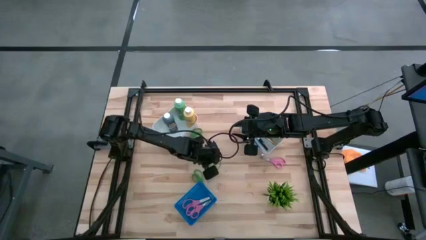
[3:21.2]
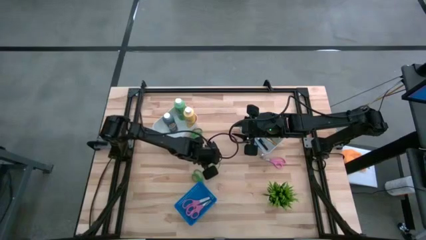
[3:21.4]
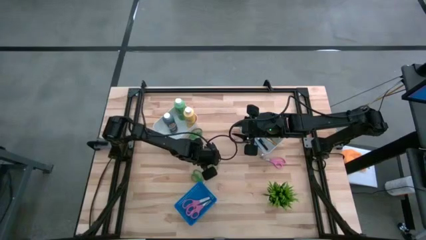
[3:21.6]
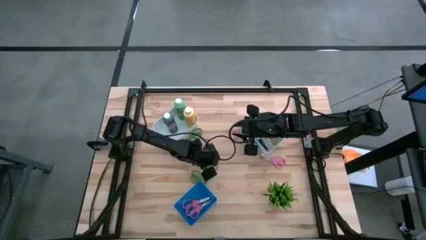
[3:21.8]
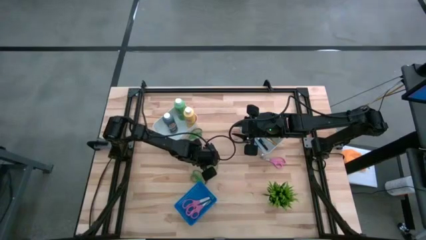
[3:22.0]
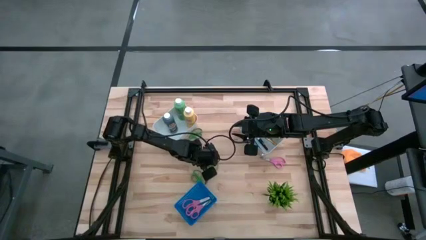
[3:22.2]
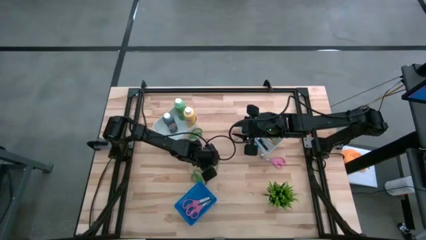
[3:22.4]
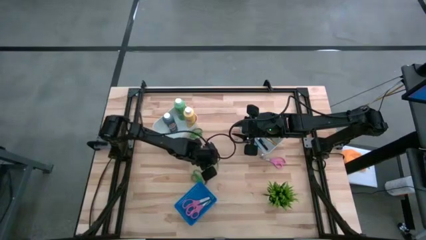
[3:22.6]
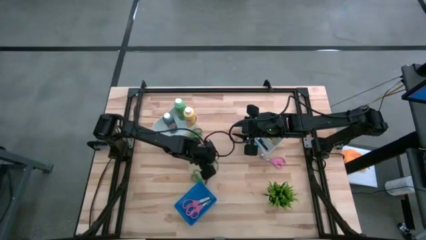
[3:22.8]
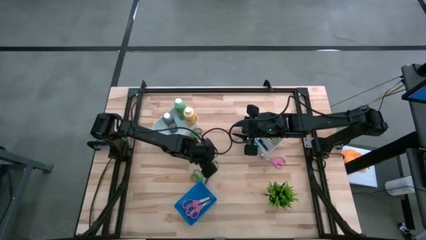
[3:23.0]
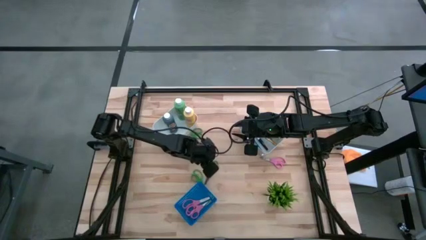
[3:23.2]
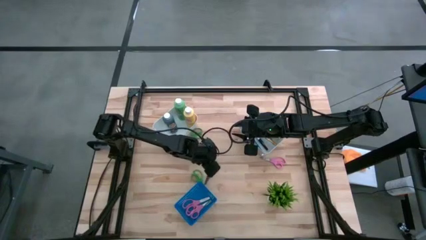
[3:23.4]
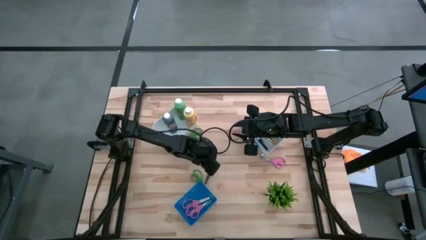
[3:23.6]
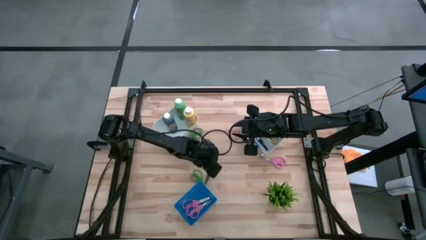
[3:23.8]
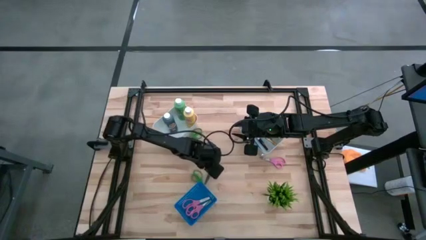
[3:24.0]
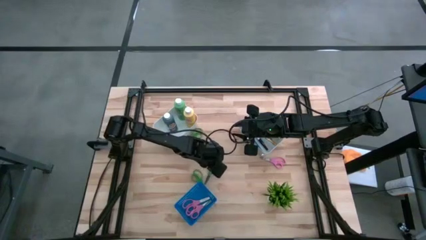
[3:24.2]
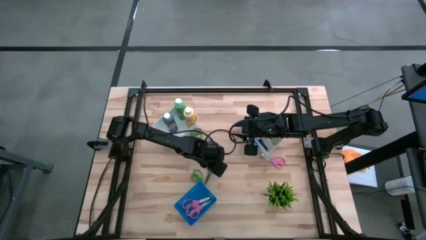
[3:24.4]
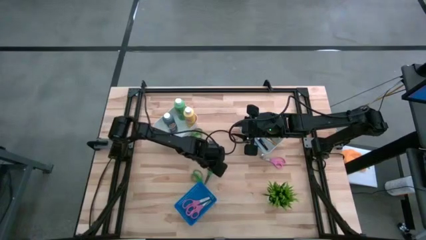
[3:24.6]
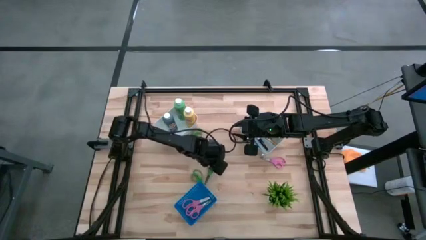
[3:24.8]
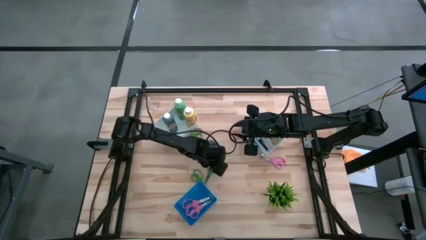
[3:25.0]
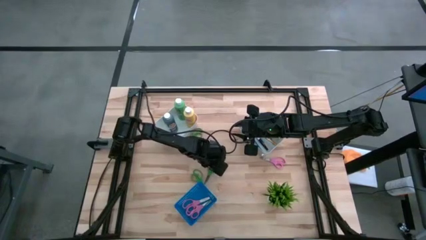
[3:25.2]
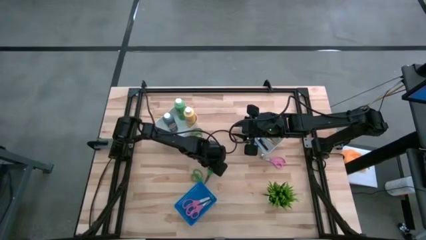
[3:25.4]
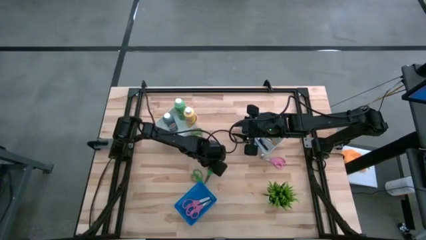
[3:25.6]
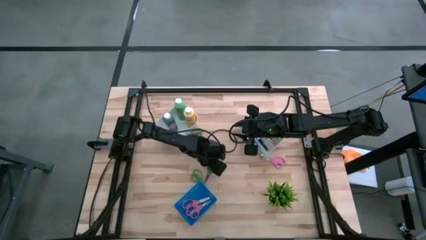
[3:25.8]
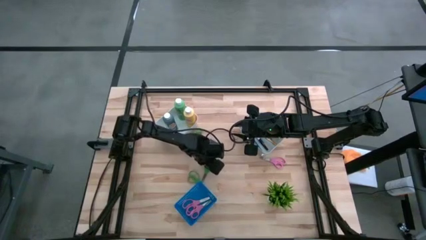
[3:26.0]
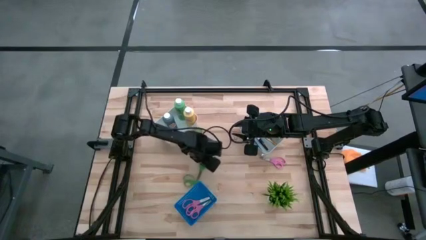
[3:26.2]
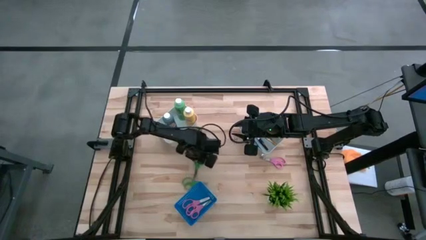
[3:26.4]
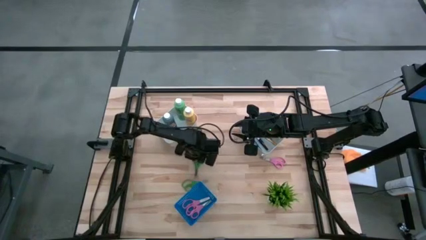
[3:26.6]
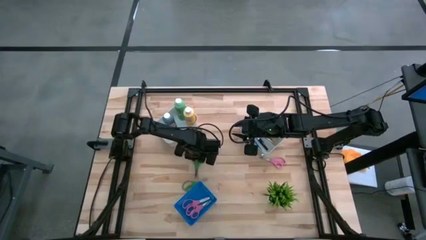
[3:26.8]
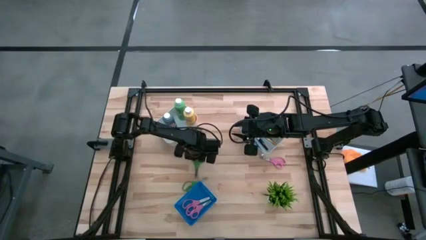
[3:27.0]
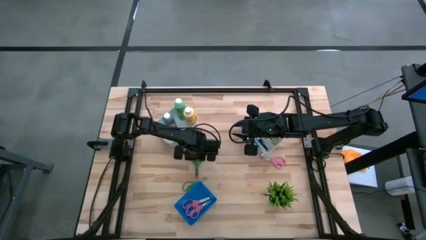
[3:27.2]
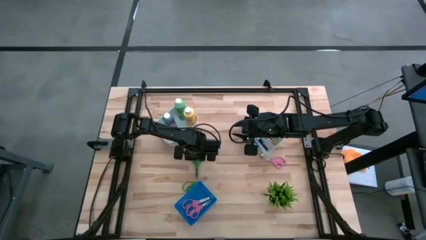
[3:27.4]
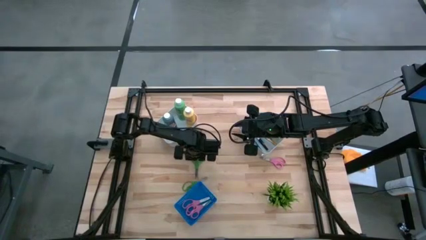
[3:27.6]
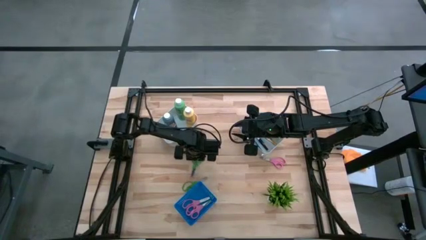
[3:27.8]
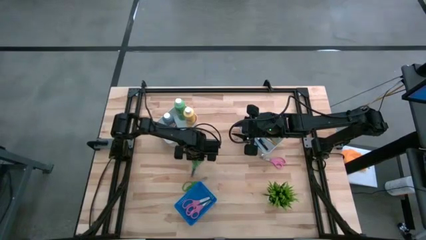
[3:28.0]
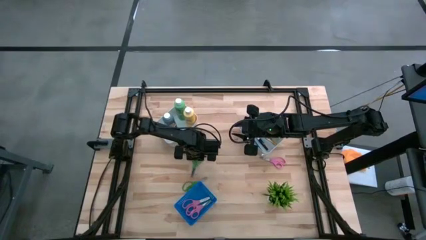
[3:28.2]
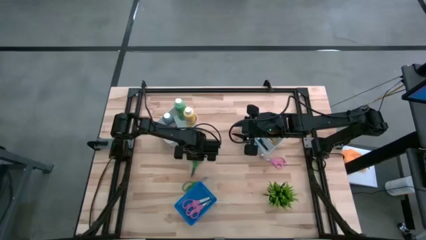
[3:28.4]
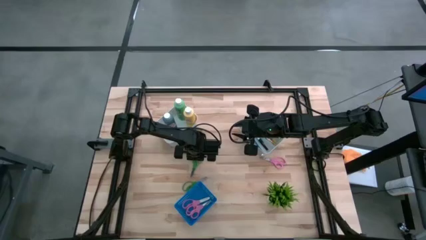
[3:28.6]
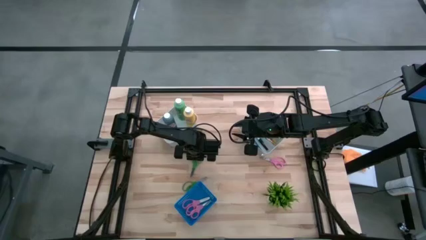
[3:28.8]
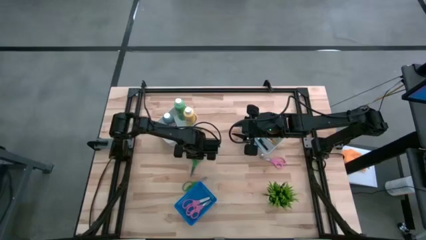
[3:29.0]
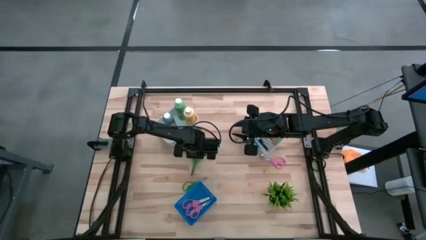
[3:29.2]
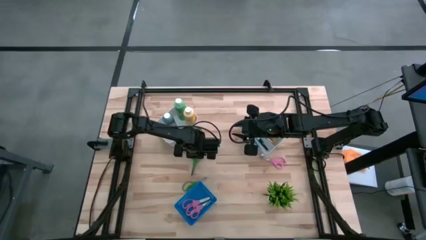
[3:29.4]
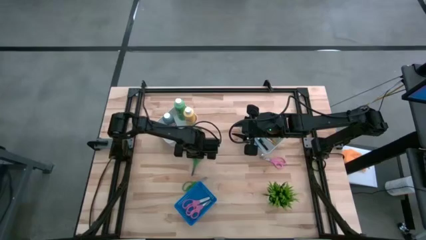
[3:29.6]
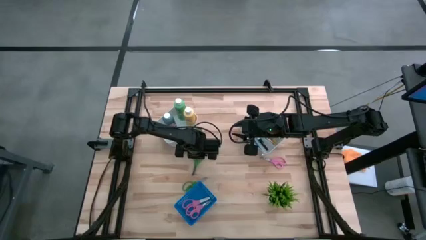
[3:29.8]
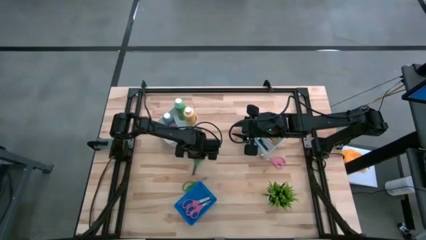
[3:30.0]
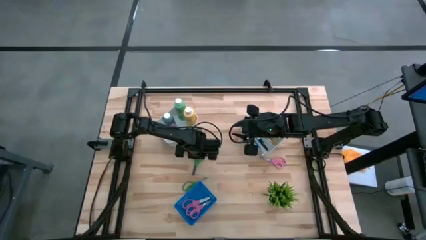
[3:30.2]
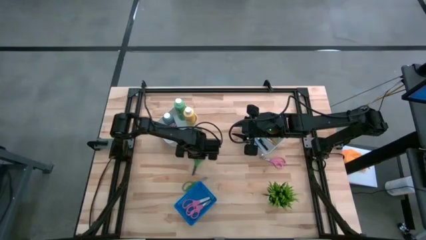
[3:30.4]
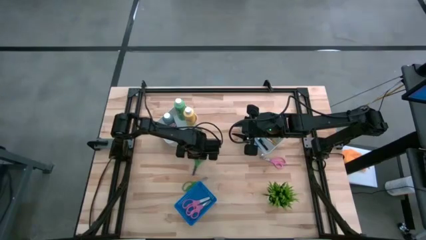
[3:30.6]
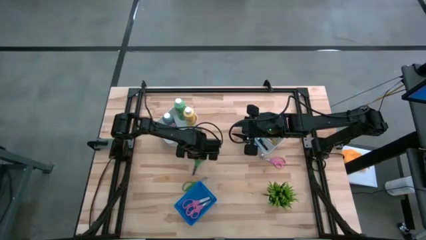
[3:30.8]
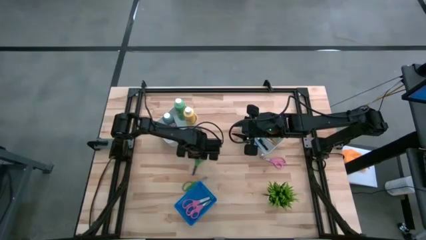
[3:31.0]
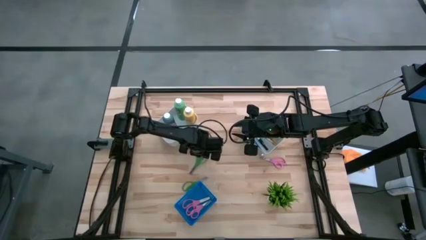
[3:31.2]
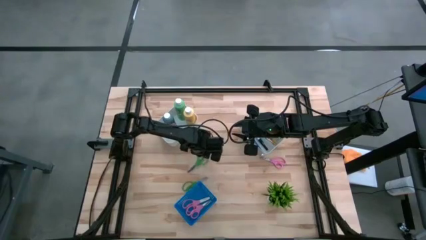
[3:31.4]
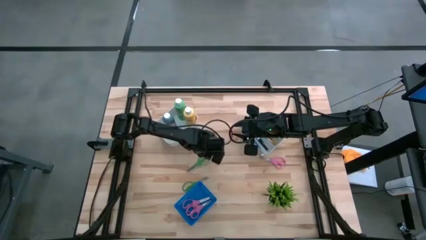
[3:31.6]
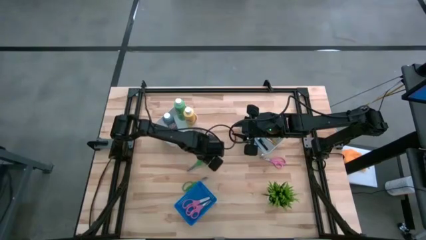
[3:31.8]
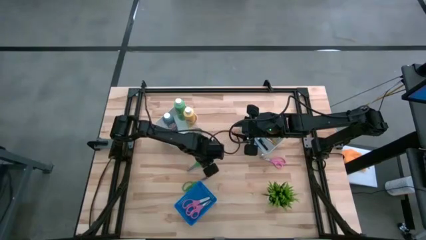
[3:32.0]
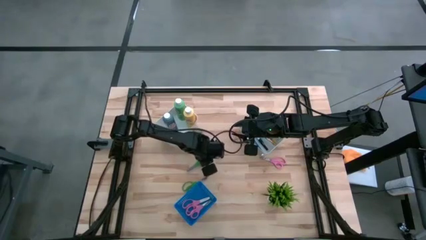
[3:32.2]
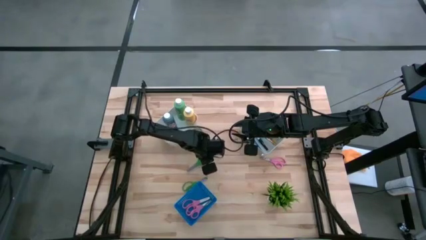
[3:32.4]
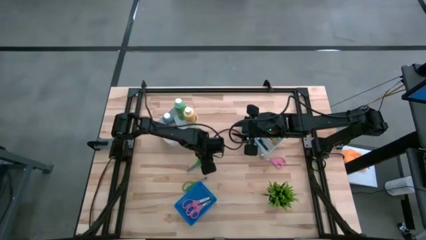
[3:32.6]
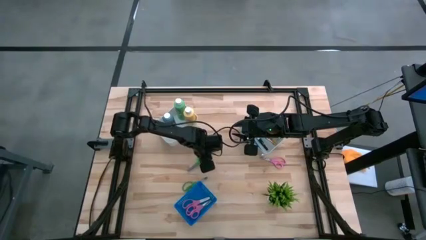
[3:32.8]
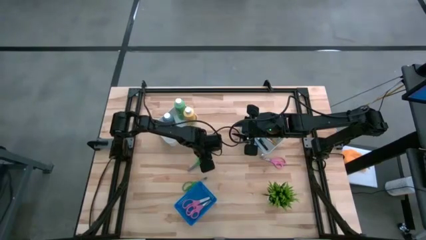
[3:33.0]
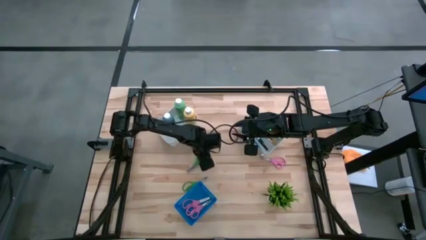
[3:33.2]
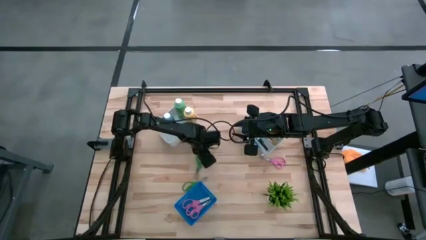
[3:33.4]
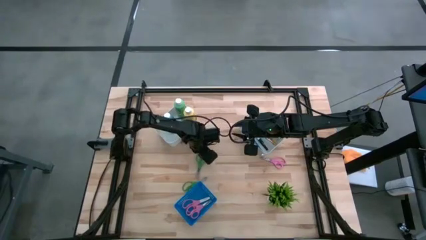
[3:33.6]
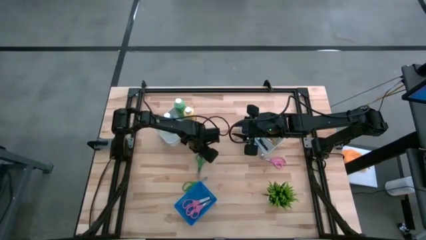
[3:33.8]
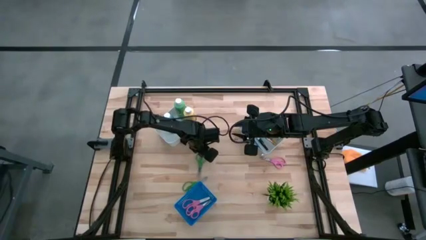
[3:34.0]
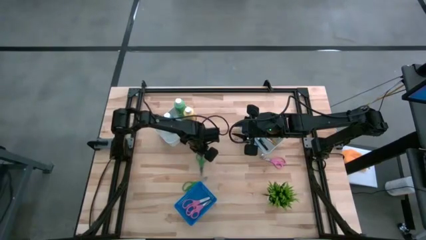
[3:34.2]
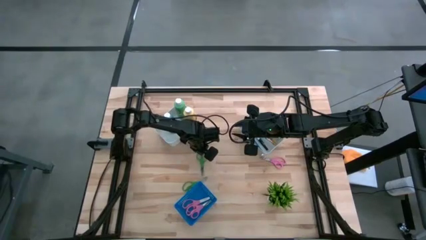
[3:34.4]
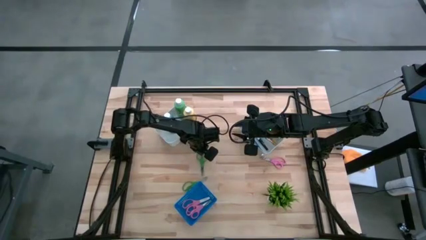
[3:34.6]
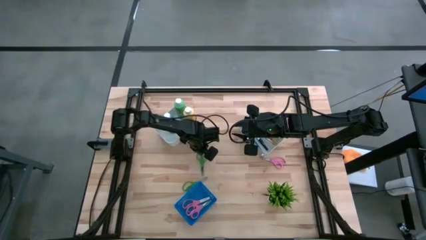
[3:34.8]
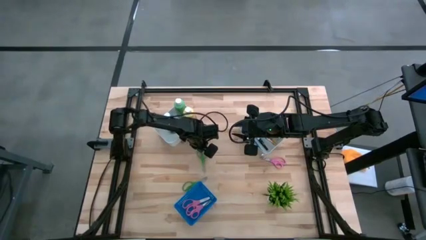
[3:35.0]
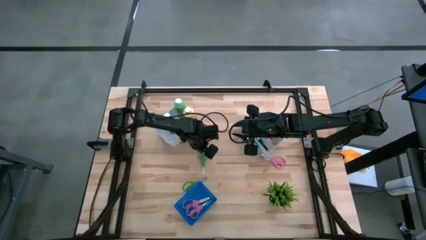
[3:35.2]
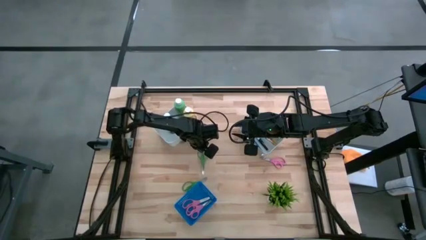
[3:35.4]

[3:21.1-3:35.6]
Task: Pick & Place Paint Supplies
Put the green scissors into the blue bin
